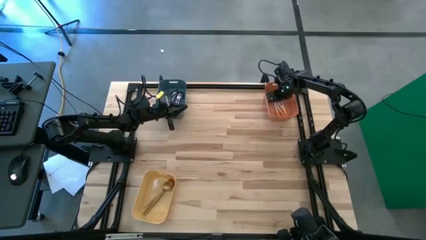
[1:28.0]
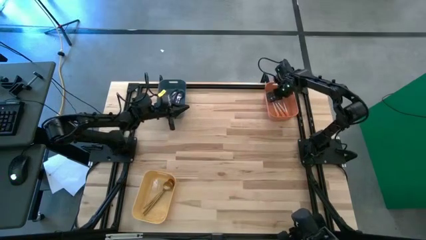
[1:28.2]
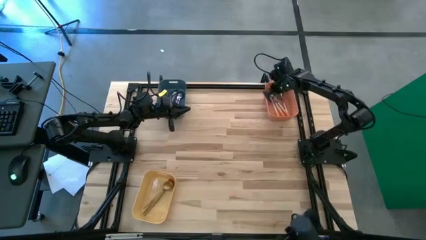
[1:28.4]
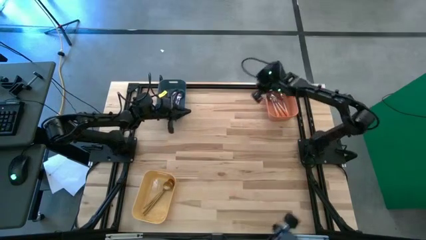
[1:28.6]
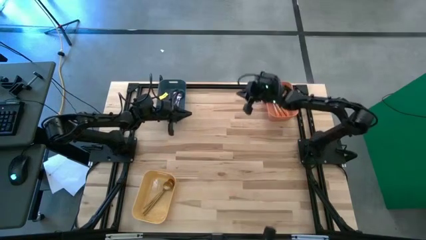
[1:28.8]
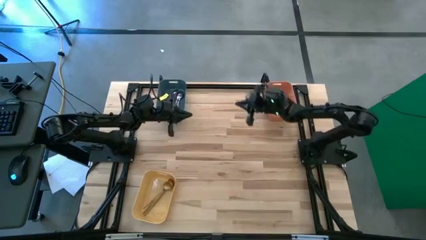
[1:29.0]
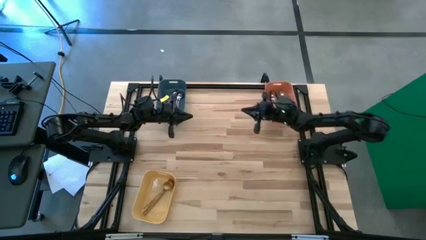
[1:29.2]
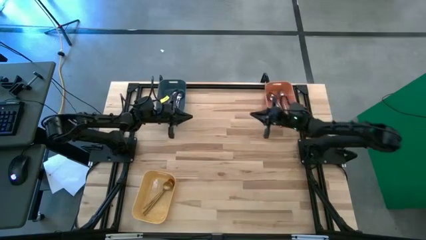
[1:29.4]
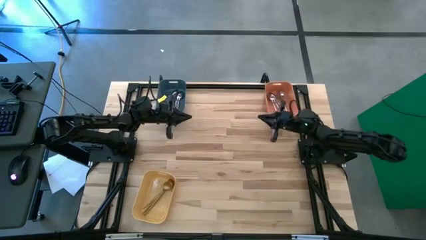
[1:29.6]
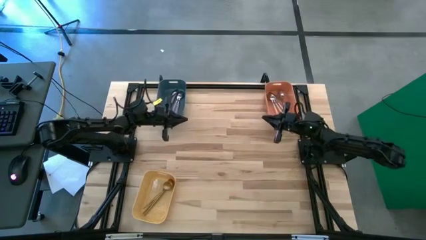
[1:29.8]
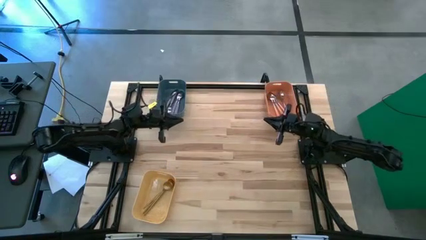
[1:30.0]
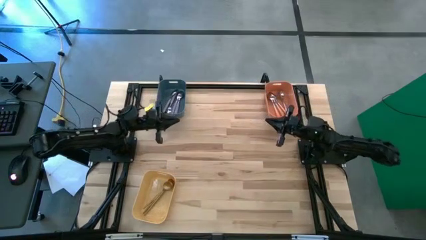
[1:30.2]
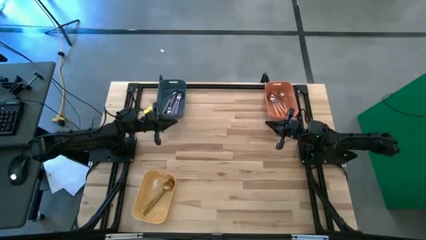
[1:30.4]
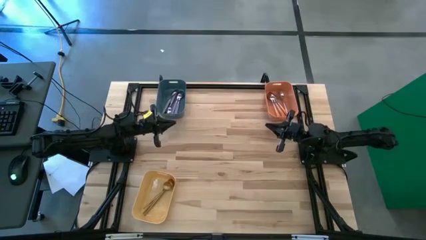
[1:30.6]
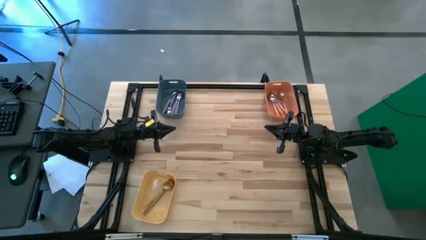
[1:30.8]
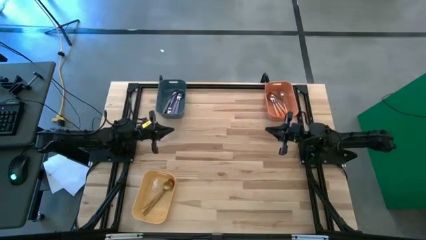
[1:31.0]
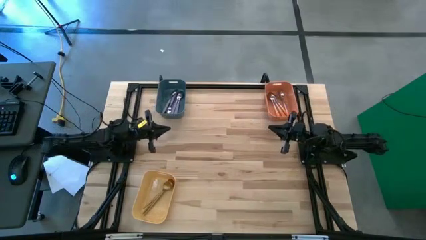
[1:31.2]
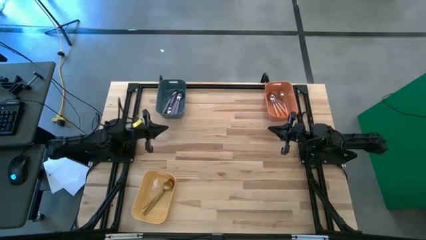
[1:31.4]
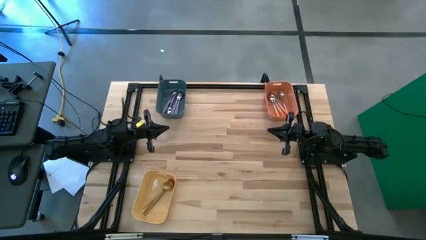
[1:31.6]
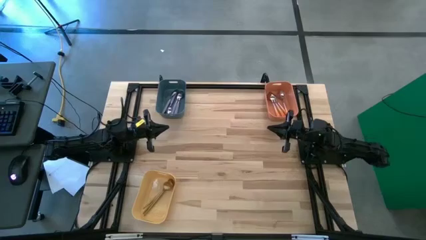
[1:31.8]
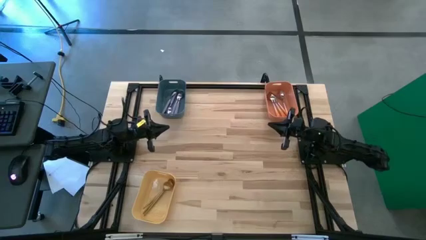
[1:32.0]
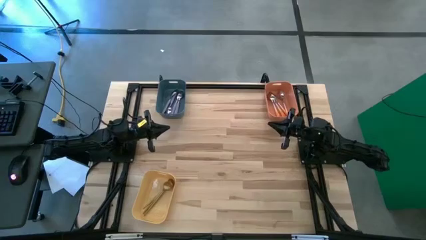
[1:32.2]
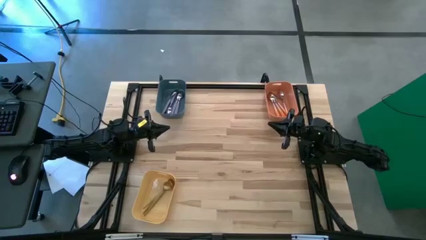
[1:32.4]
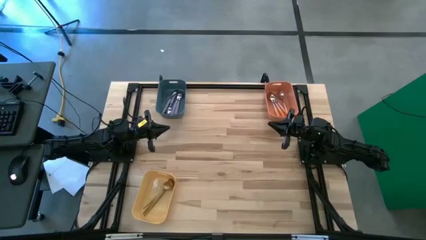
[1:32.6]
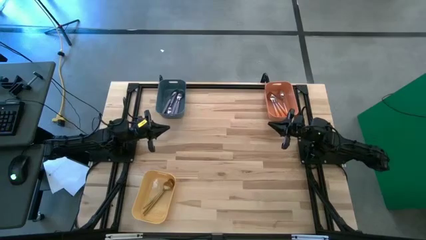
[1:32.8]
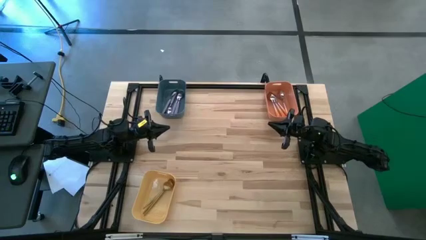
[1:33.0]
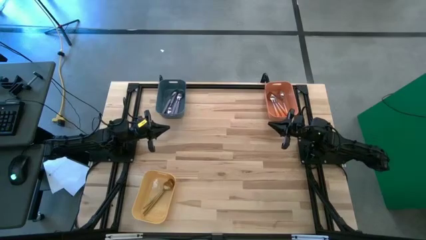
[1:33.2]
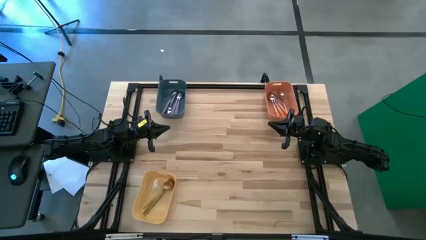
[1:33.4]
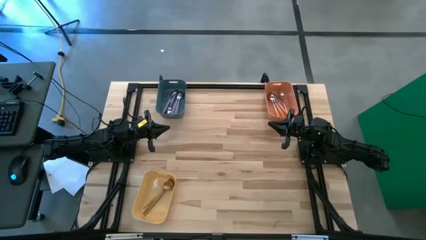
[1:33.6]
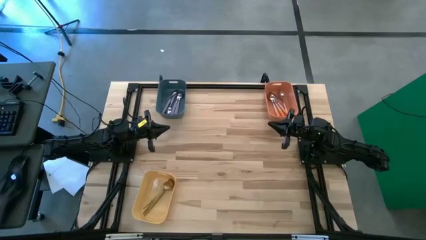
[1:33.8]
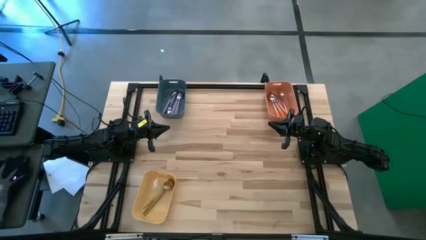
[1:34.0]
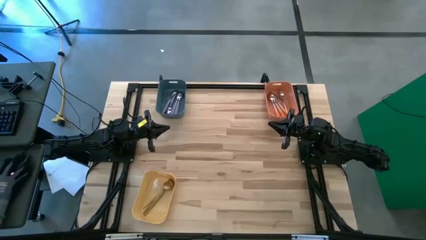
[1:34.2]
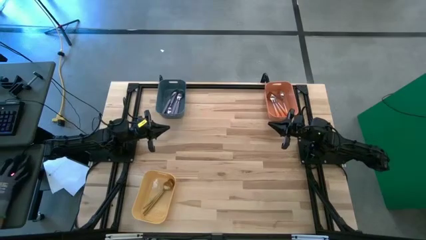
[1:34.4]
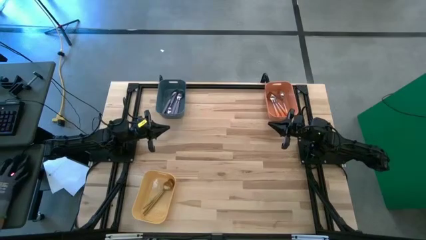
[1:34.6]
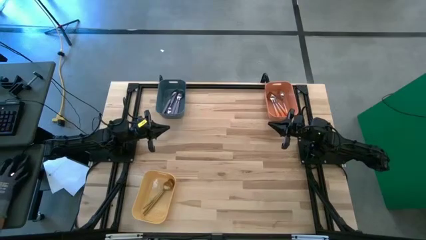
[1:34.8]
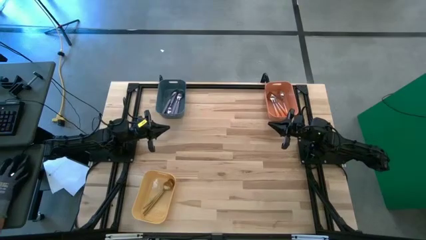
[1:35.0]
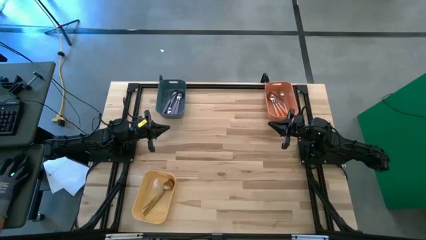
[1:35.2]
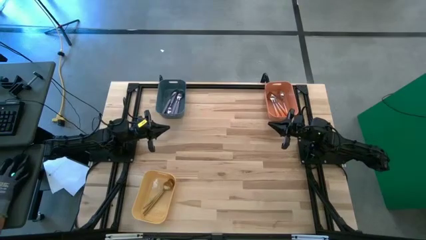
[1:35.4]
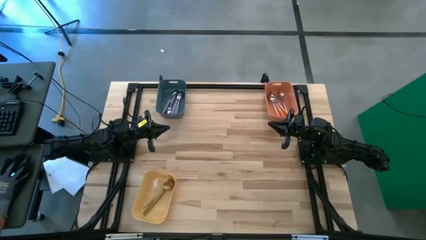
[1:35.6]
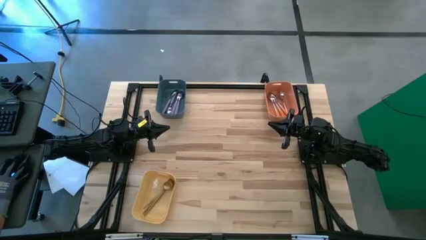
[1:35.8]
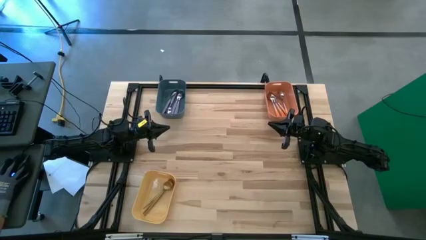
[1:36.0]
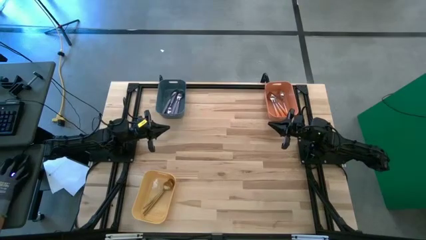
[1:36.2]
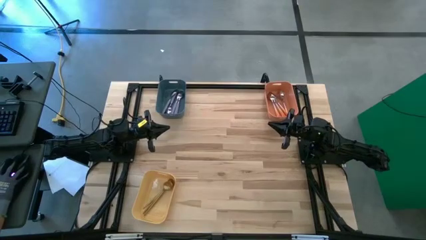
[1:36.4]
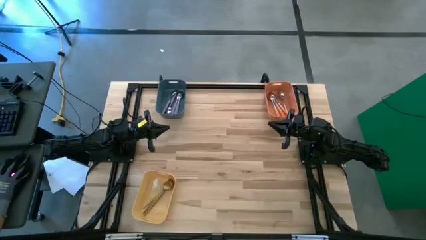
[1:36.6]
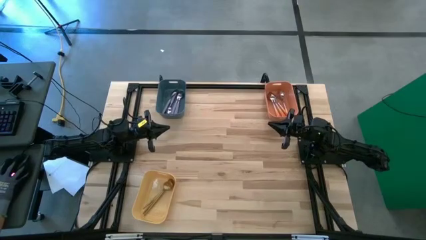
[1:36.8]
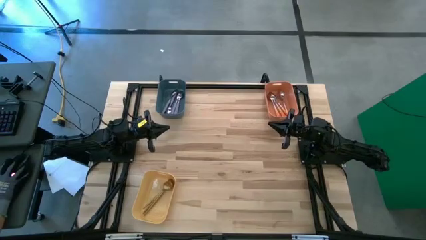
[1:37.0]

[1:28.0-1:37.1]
Task: Sort silverware by color (type)
Return to Home Position

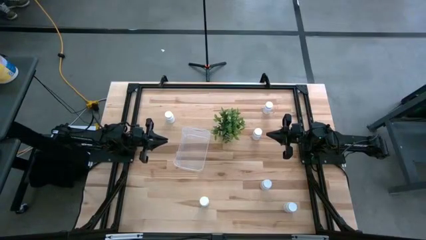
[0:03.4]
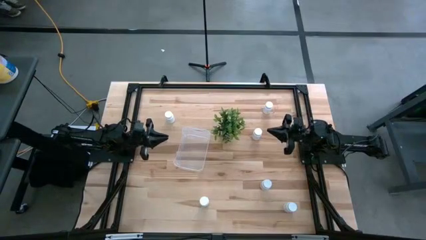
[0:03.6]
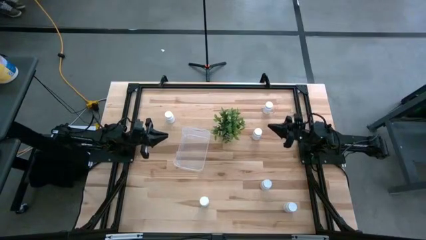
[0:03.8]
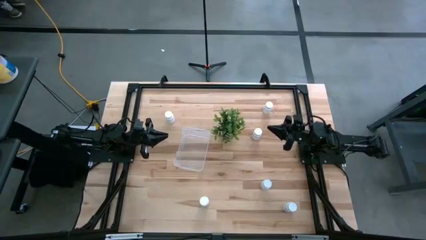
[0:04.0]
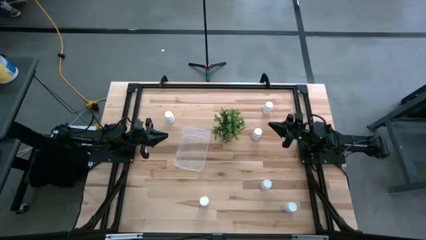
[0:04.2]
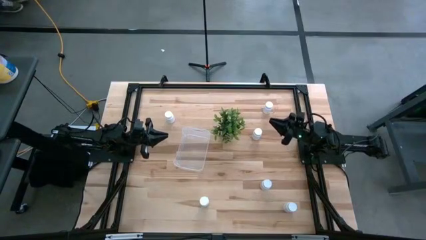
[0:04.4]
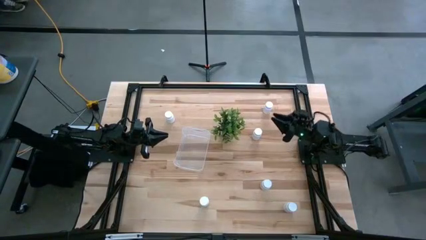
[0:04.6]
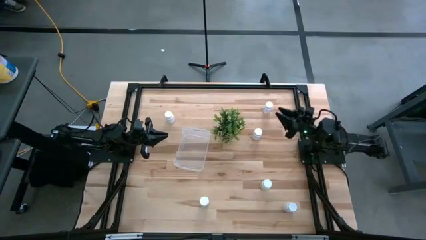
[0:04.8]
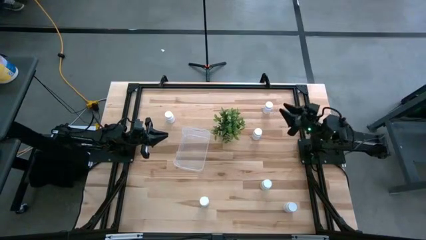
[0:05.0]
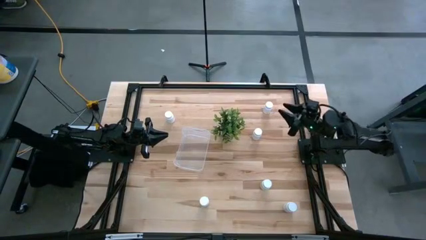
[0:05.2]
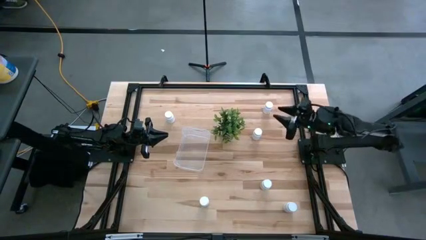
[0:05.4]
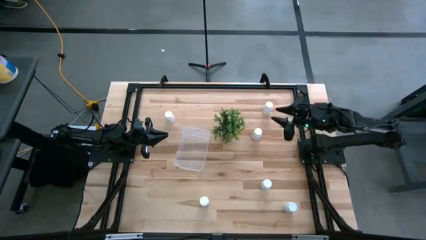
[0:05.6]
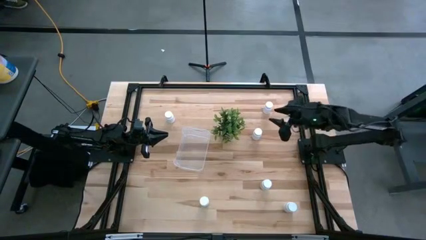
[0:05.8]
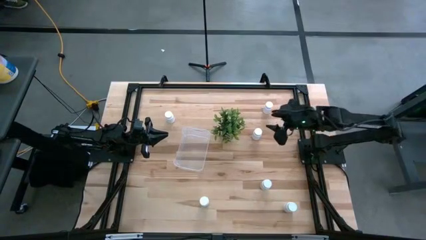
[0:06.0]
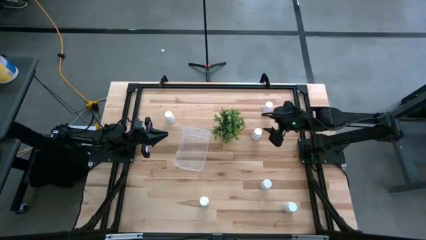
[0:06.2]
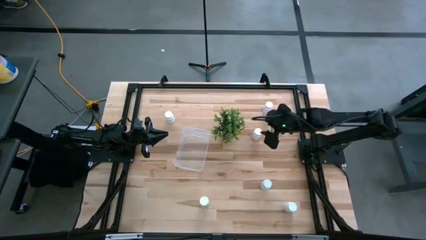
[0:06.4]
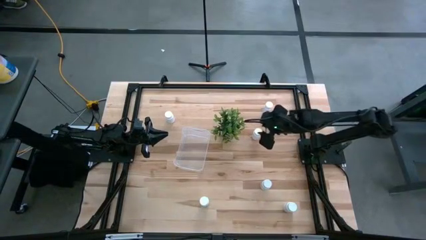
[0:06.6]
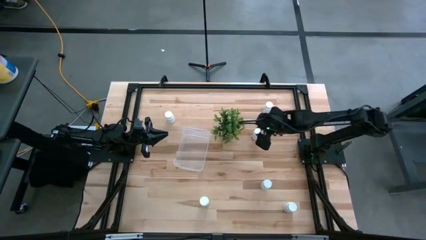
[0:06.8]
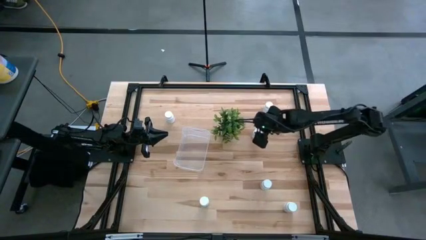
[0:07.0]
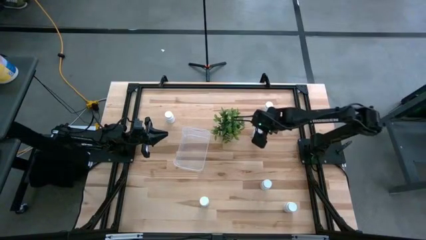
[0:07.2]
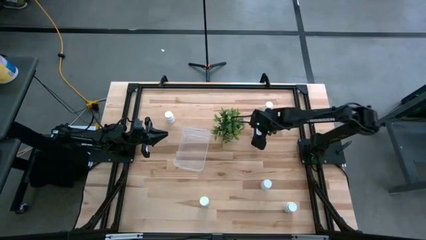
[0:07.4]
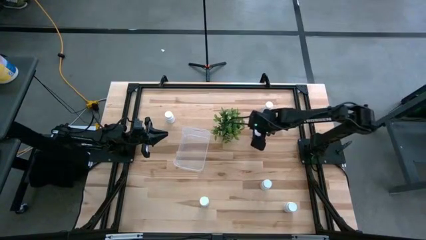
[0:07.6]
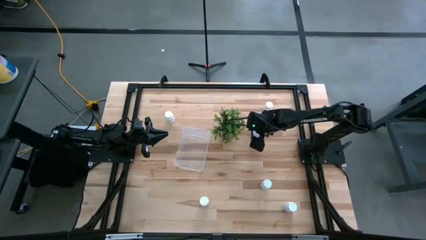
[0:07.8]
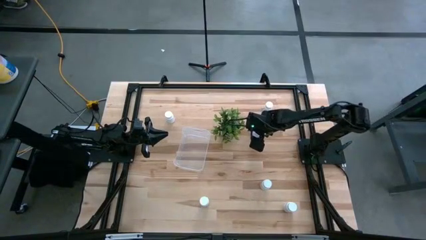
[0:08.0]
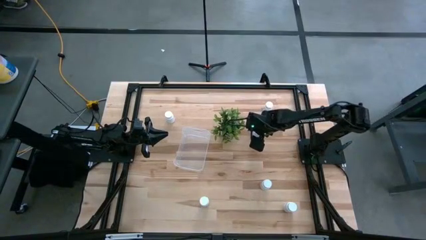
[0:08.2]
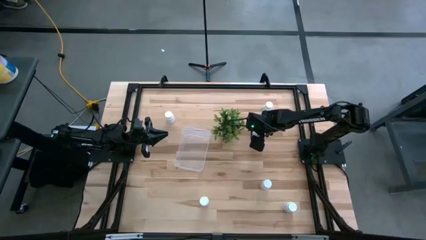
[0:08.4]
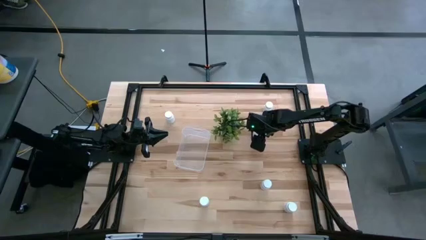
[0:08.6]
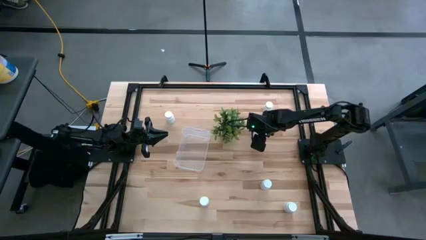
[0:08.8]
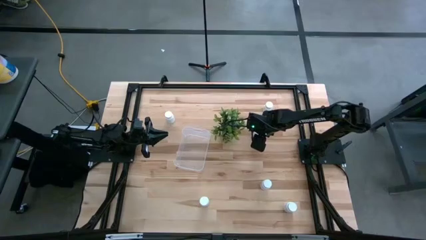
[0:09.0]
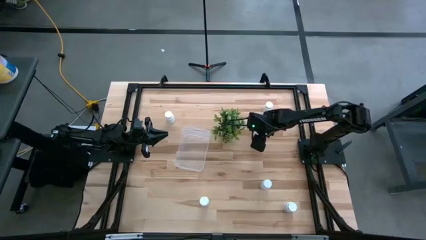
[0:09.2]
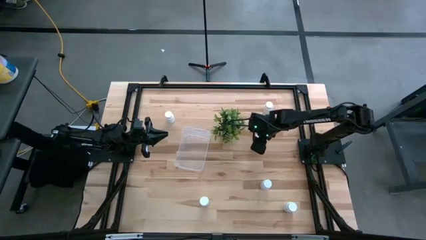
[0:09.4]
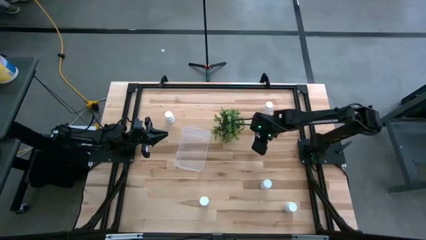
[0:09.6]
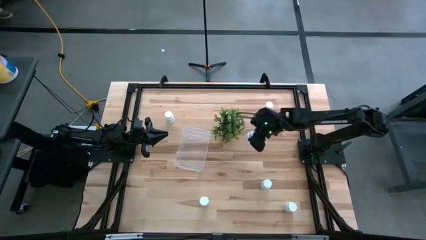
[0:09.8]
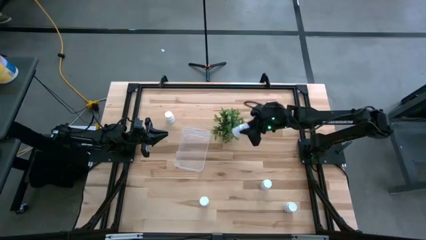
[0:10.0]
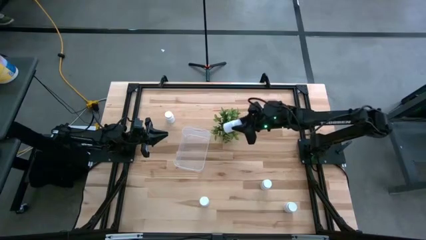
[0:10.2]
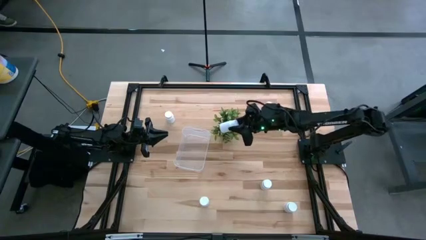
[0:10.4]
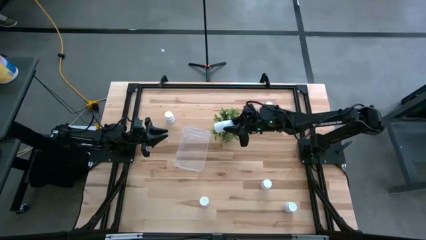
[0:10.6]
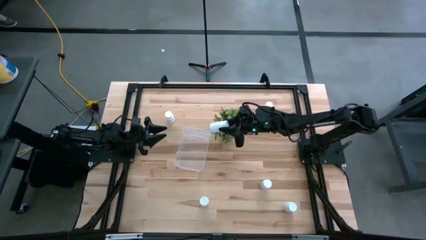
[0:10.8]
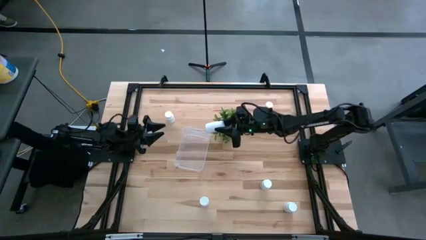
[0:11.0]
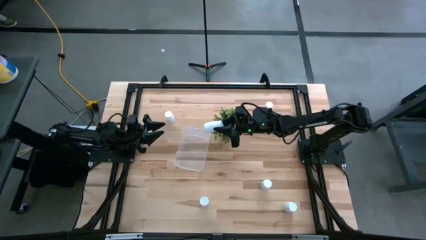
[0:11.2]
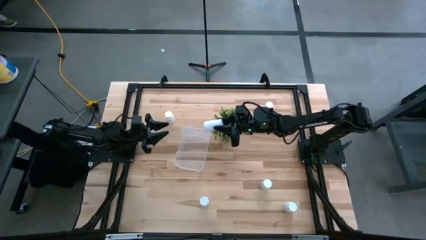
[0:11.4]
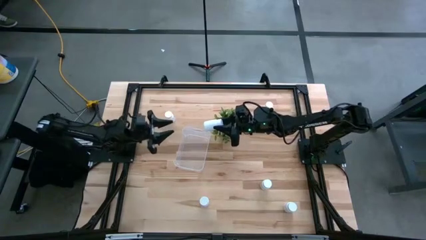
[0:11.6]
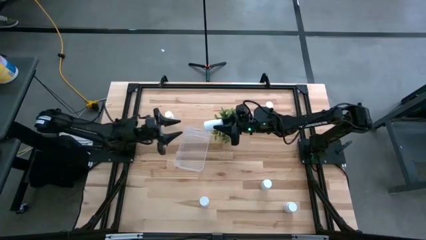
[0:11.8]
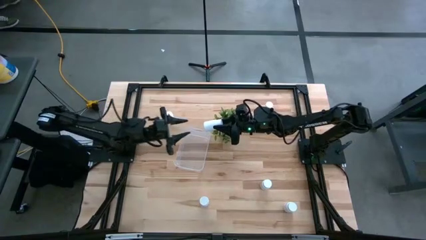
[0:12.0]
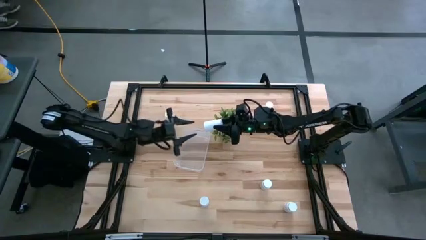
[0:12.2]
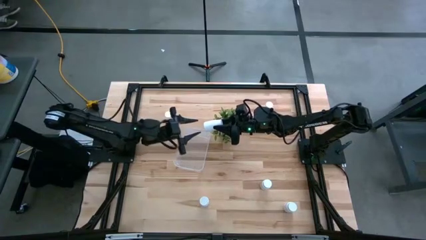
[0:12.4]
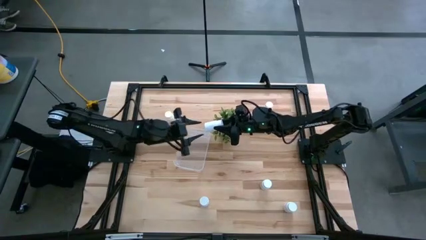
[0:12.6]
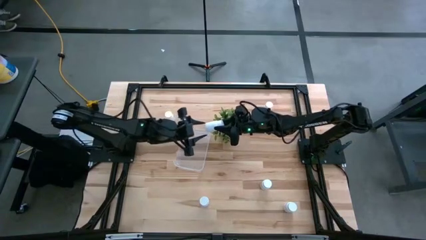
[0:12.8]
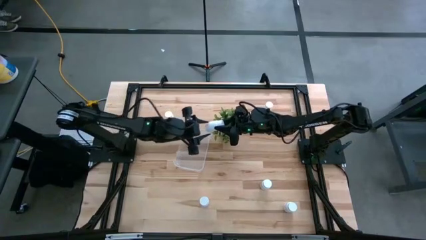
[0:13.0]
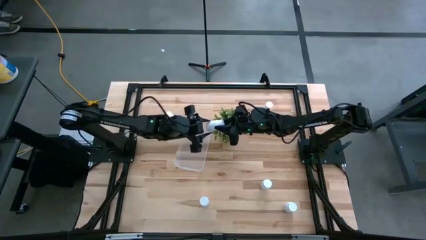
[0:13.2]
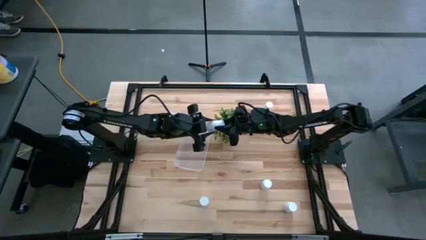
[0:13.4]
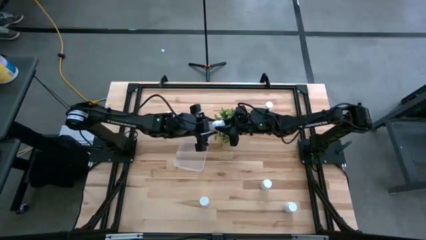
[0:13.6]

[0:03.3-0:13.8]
Task: Pick and place pill bottles into a basket
Put the white pill bottle into the transparent bin
